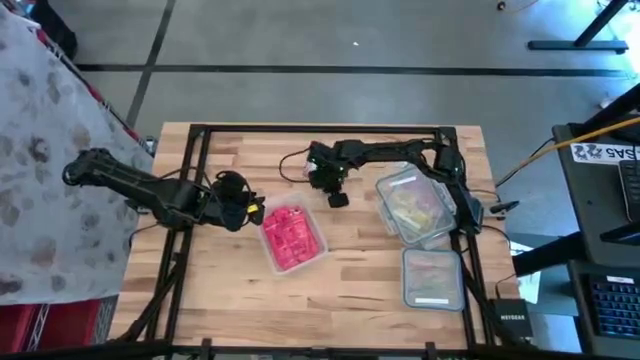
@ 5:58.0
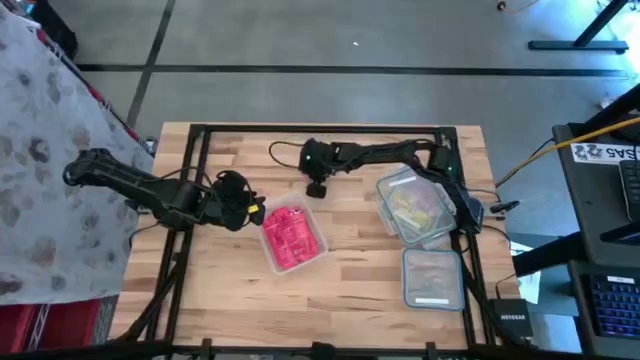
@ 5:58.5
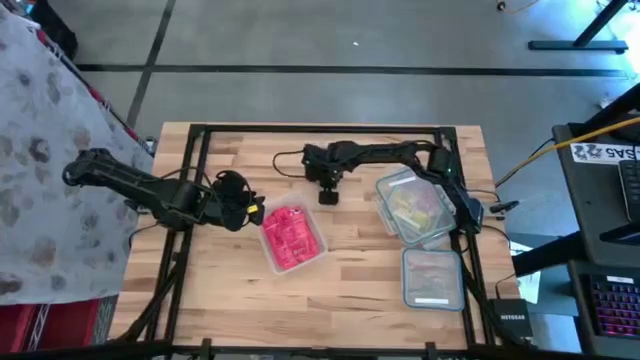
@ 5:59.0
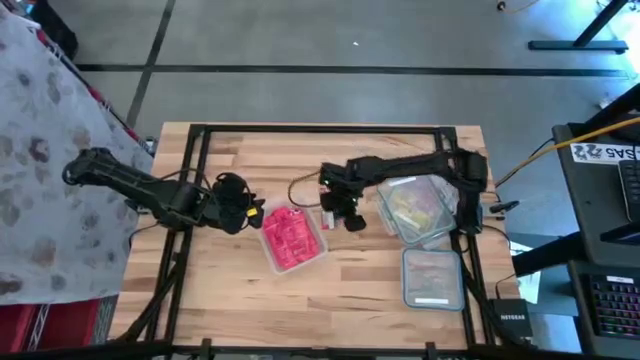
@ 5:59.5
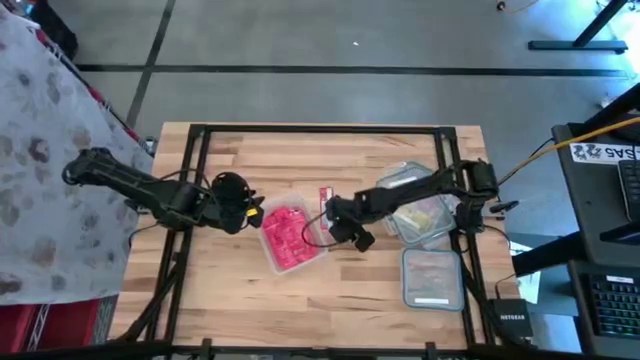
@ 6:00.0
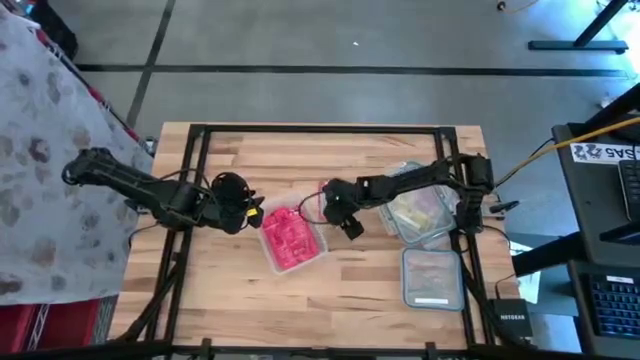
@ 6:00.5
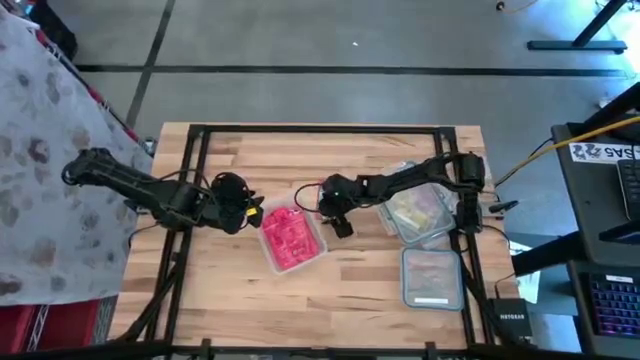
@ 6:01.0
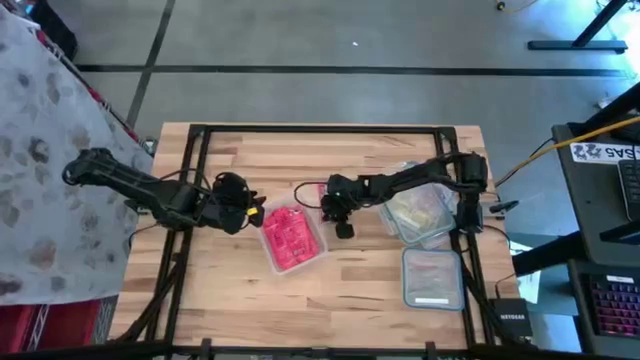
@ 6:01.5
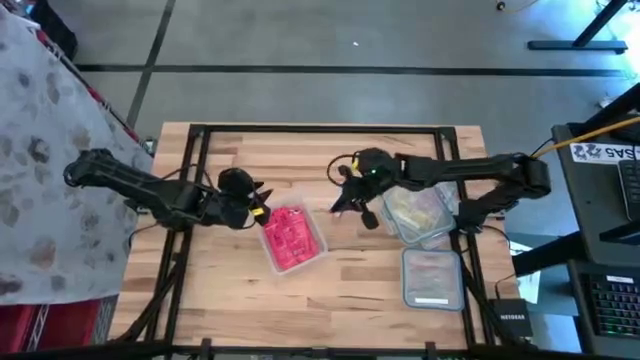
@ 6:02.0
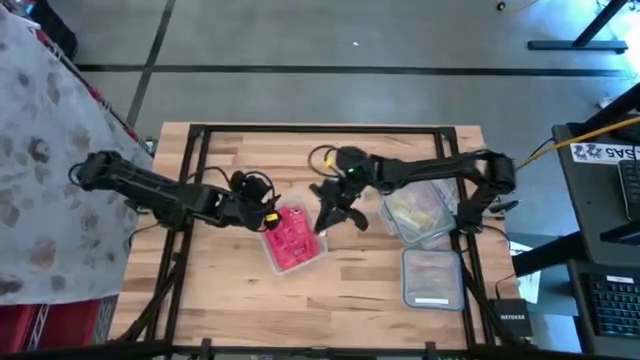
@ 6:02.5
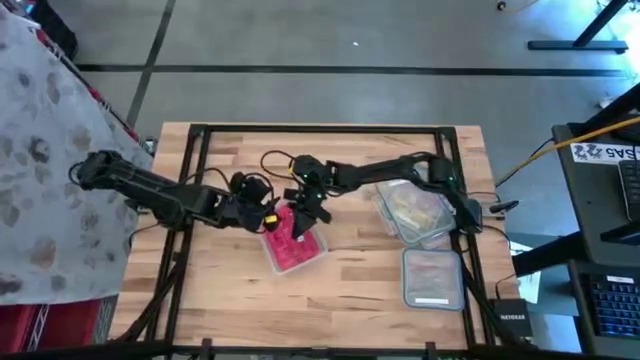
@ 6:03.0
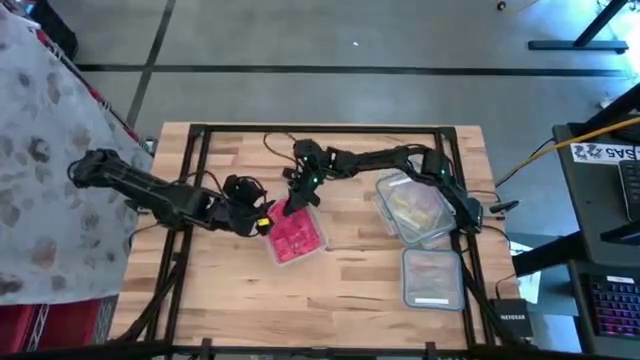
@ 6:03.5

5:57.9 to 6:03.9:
Task: Sort candy
Put the pink candy strip into the left transparent bin

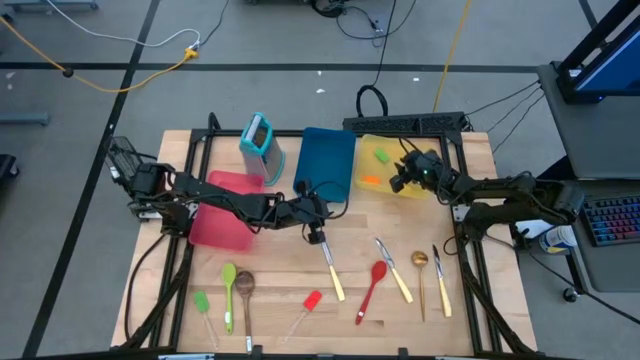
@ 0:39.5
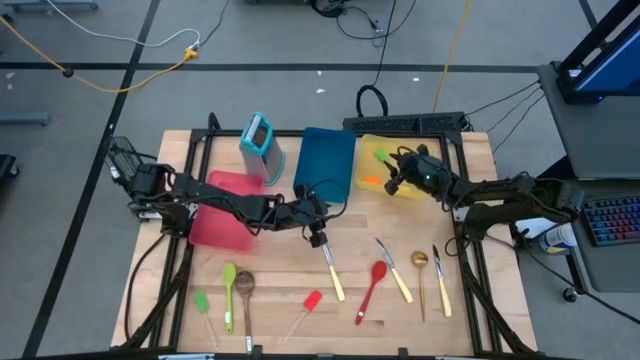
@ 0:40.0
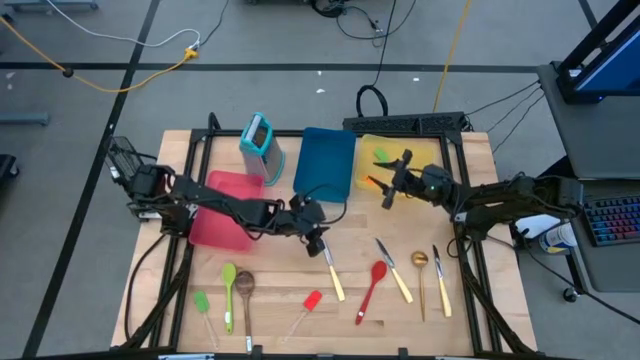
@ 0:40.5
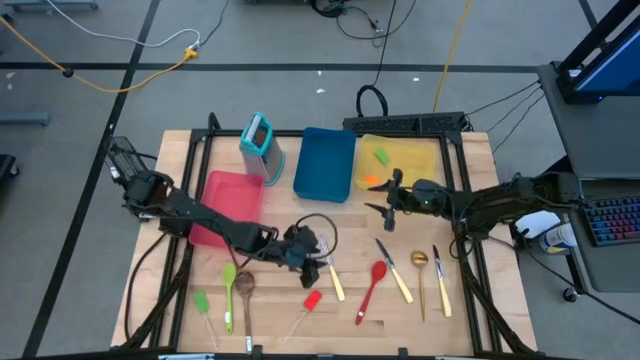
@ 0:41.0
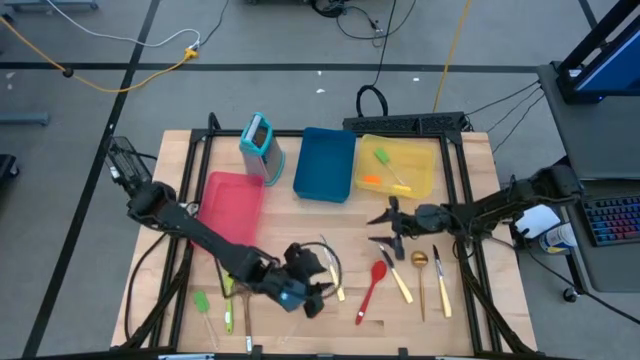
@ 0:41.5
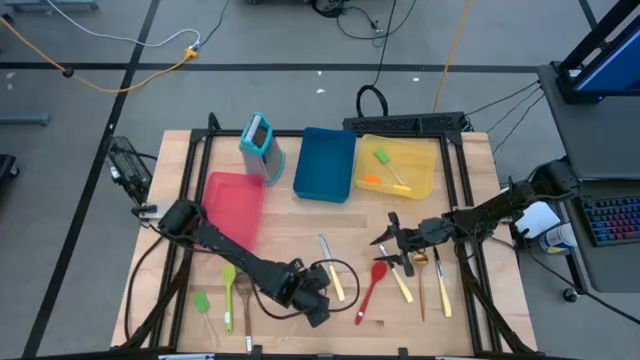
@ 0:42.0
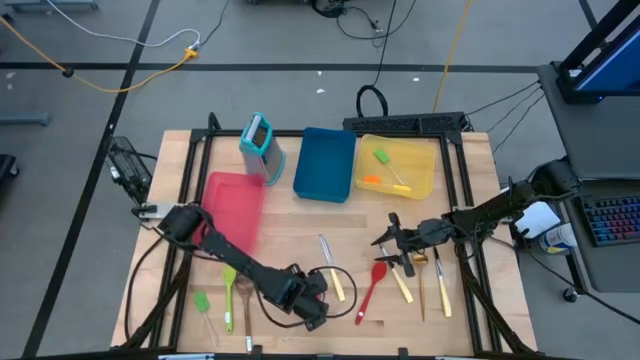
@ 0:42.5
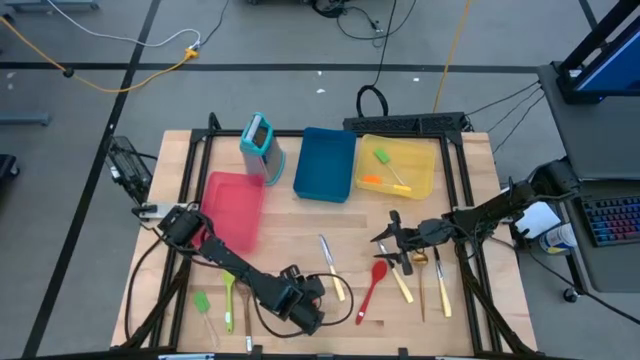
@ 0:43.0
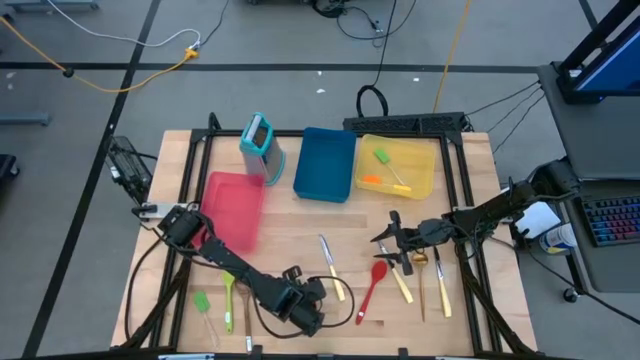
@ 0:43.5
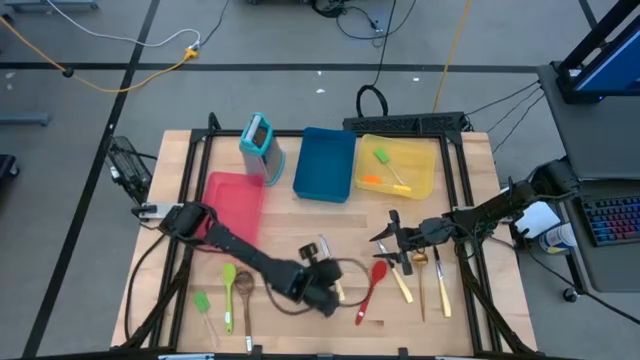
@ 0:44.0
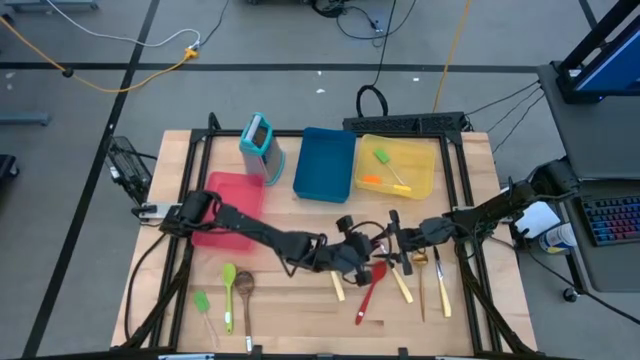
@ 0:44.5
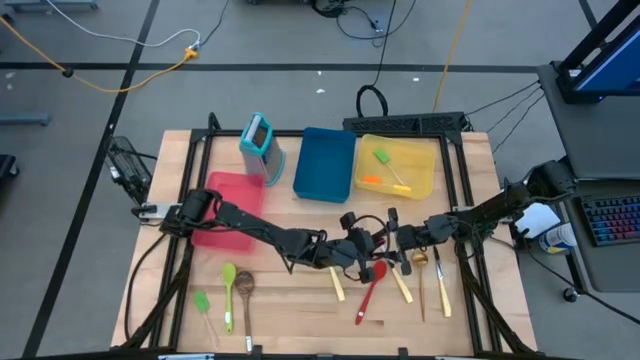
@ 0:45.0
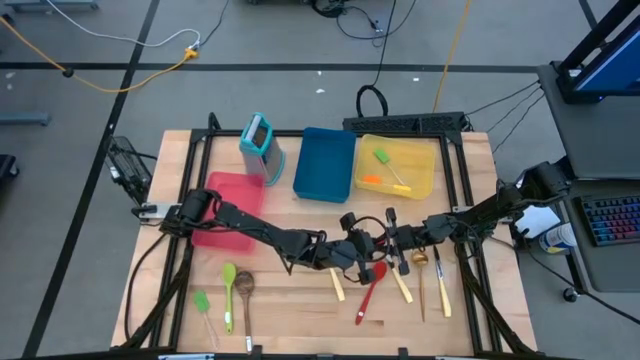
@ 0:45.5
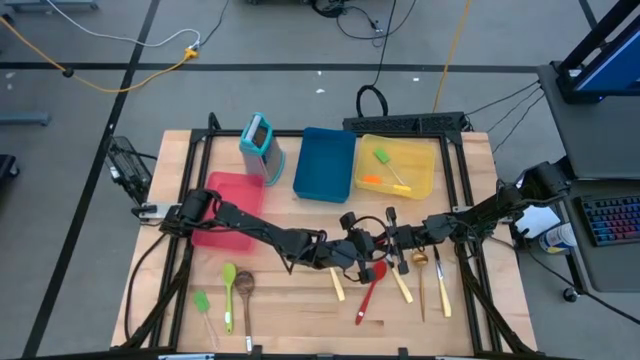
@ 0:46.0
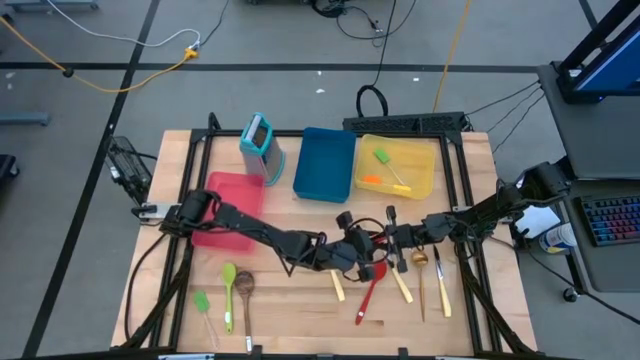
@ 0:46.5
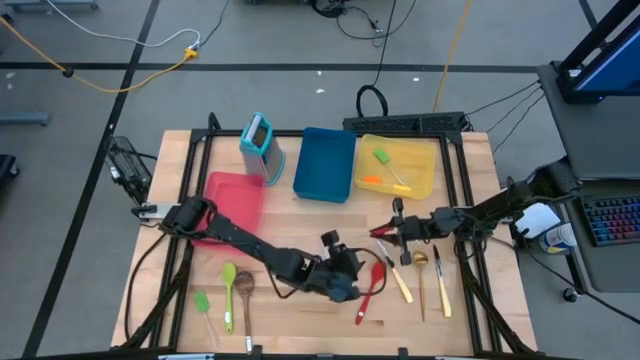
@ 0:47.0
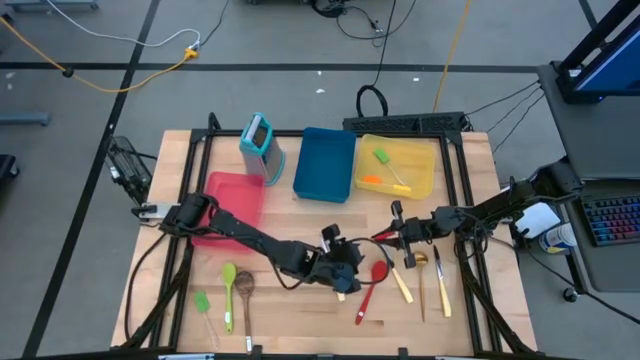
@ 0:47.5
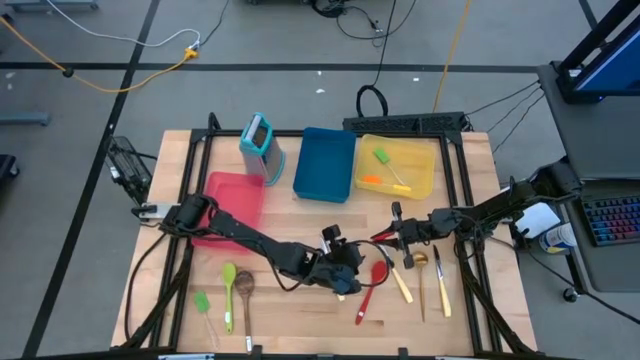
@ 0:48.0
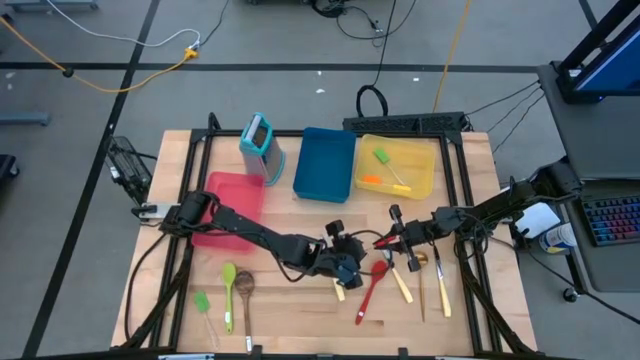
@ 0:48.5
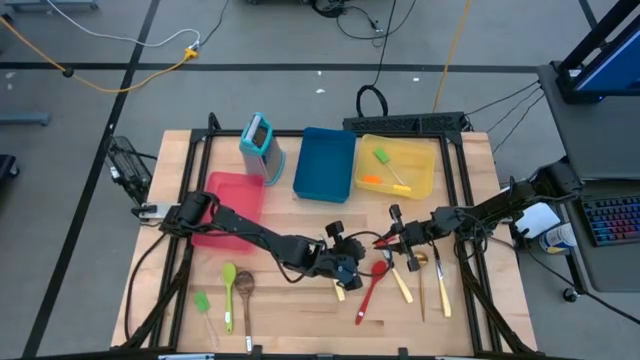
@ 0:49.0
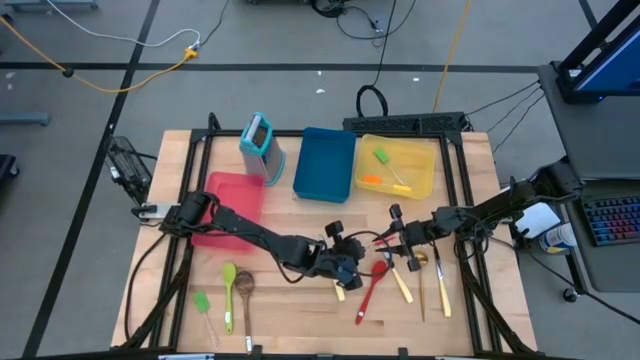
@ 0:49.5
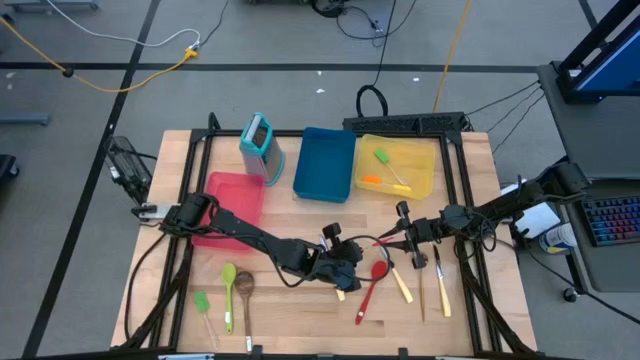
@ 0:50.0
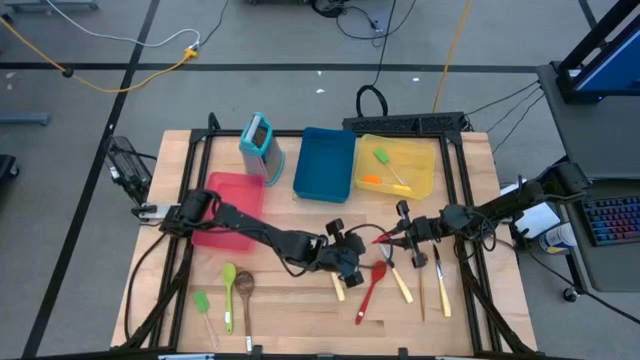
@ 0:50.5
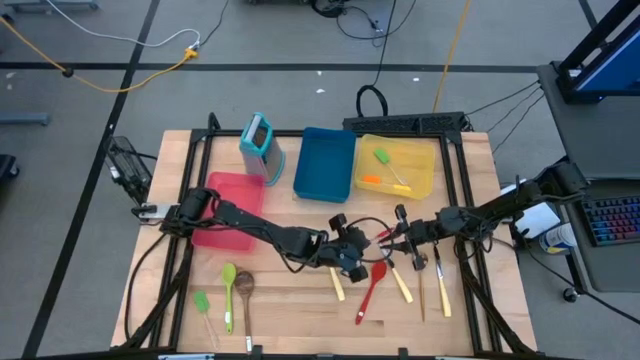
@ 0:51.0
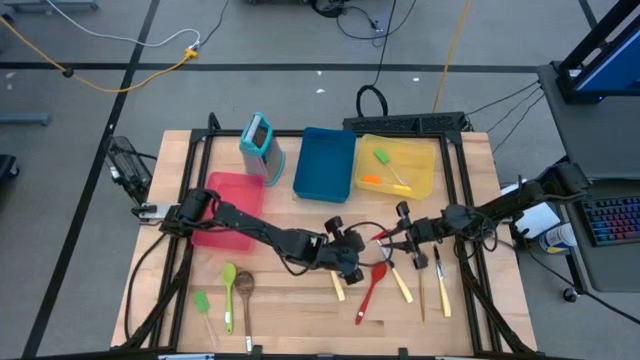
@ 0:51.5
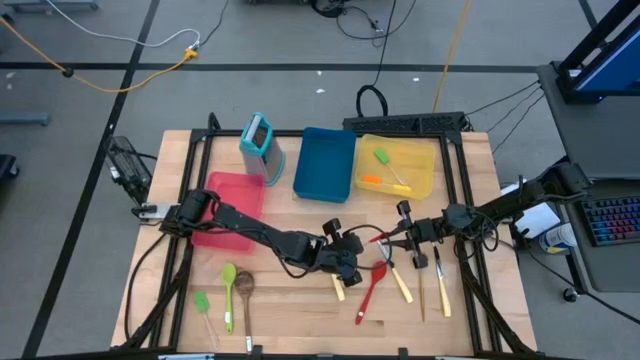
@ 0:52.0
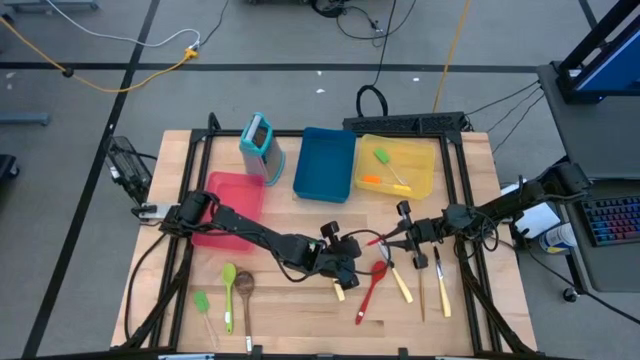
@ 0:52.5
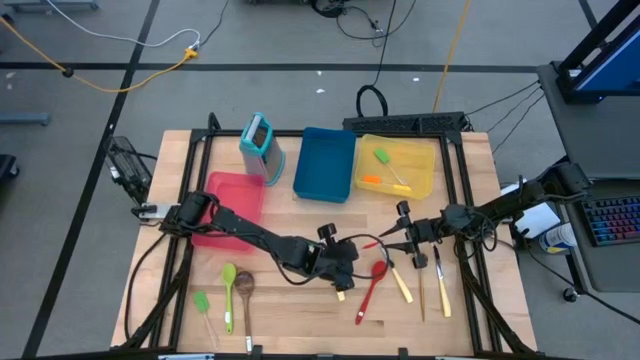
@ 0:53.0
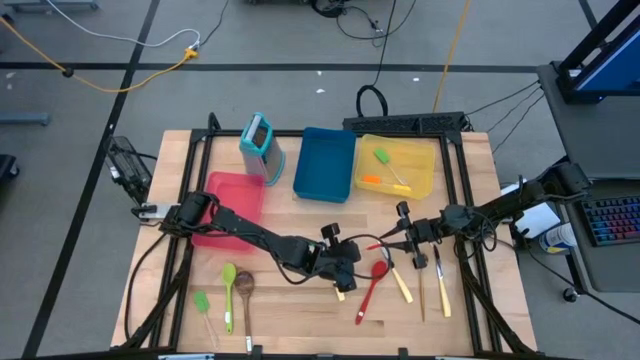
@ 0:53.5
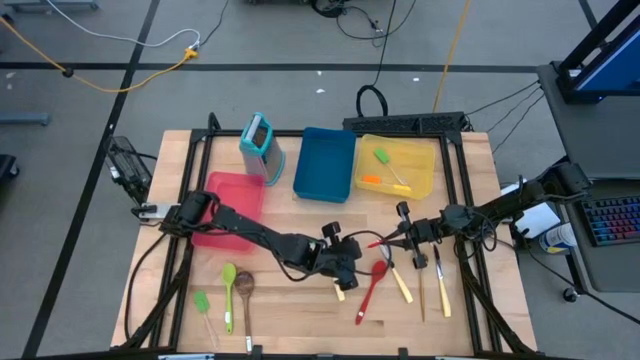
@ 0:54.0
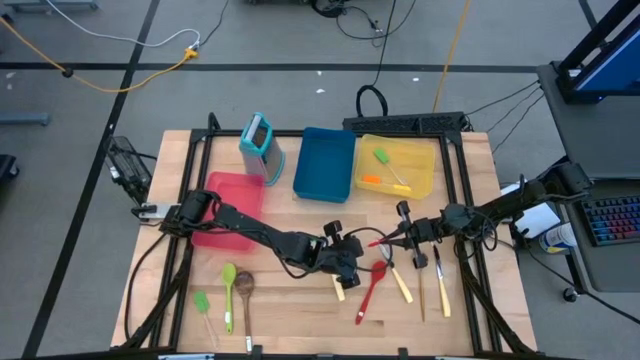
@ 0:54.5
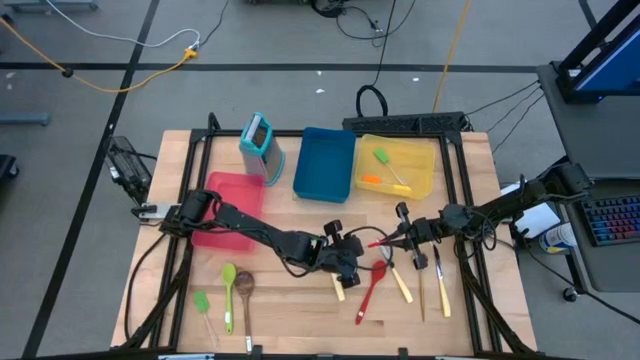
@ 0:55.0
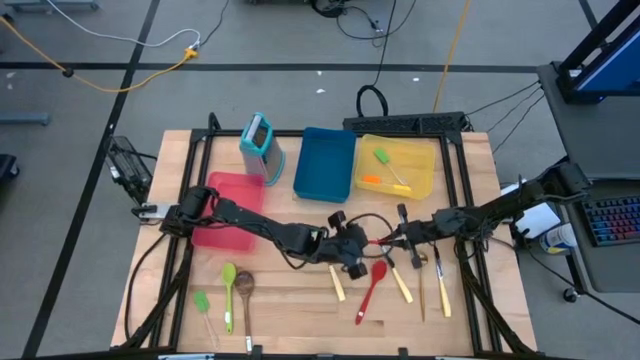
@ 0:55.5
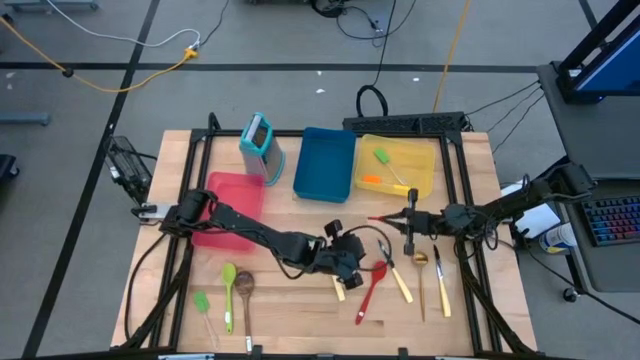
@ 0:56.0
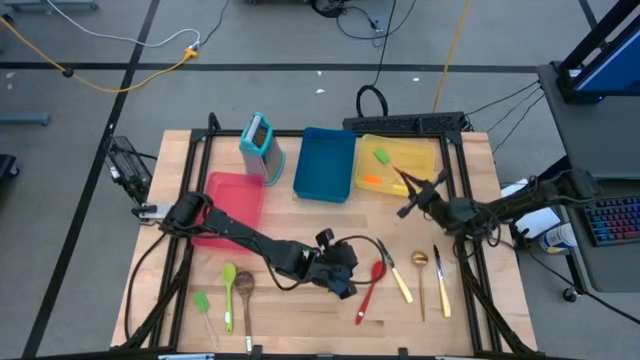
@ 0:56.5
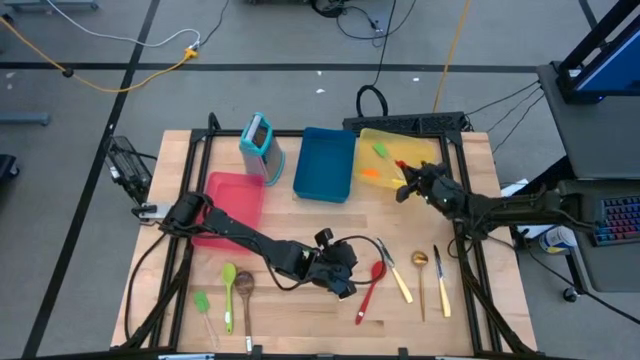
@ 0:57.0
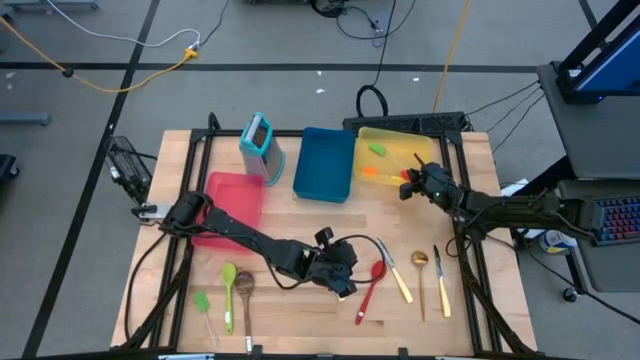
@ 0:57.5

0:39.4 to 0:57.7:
Task: Pick & Place Kitchen Items
Put the red spatula into the yellow bin
